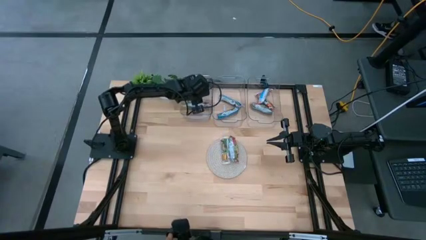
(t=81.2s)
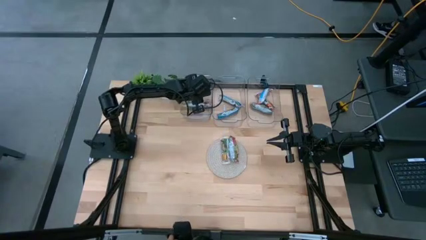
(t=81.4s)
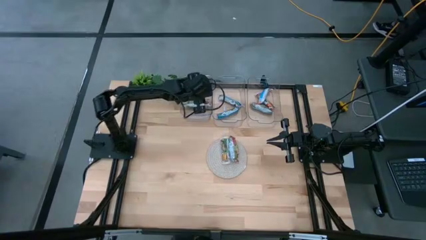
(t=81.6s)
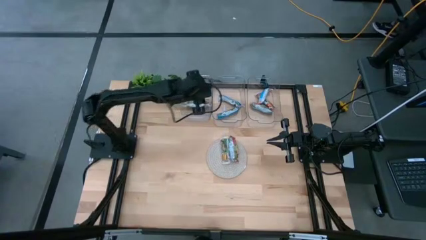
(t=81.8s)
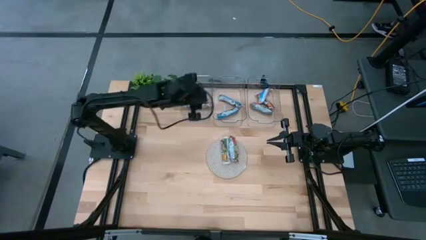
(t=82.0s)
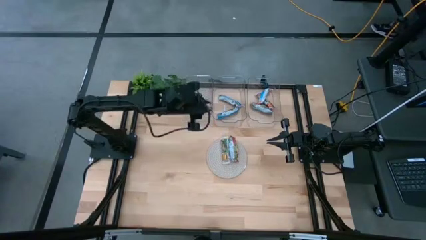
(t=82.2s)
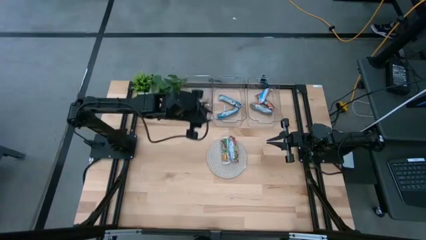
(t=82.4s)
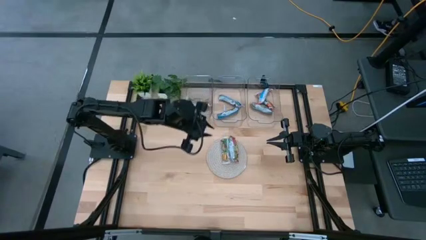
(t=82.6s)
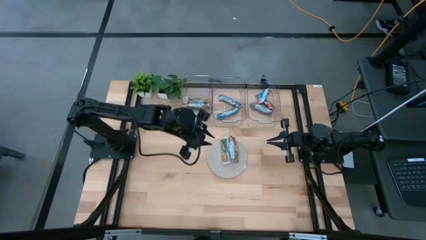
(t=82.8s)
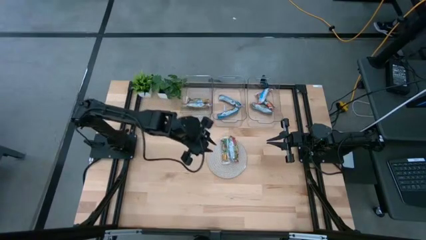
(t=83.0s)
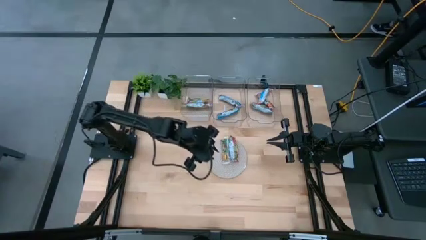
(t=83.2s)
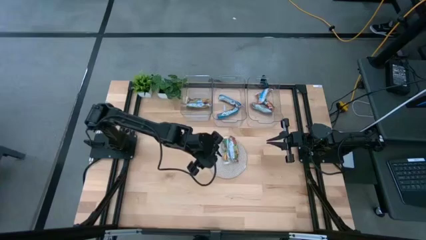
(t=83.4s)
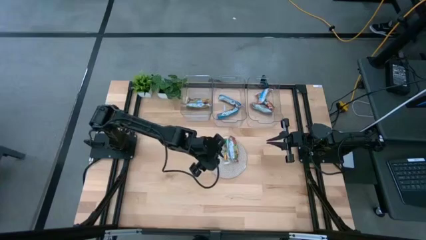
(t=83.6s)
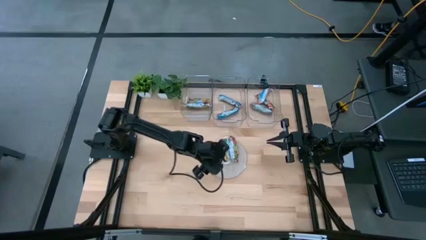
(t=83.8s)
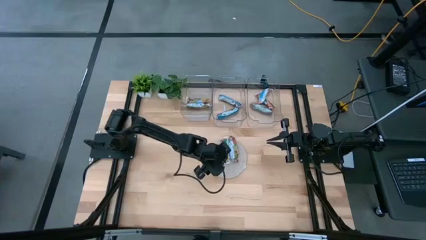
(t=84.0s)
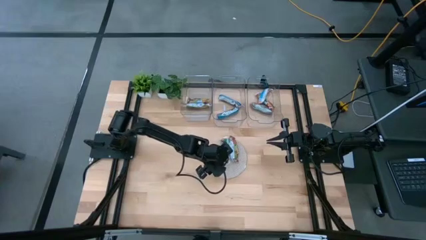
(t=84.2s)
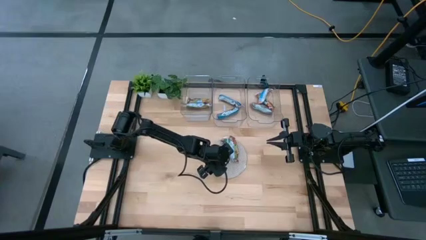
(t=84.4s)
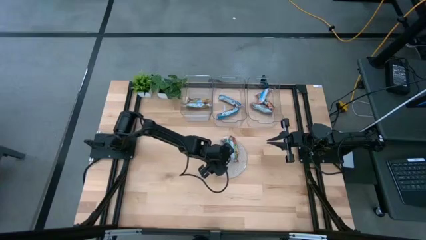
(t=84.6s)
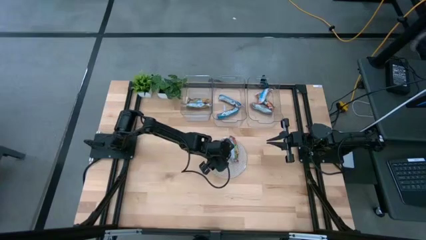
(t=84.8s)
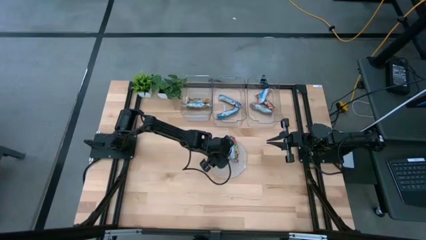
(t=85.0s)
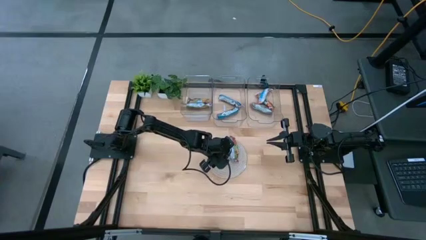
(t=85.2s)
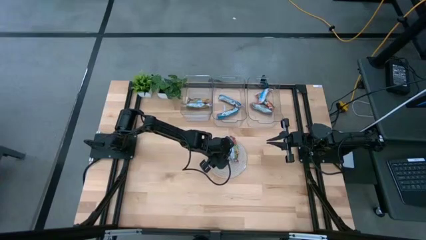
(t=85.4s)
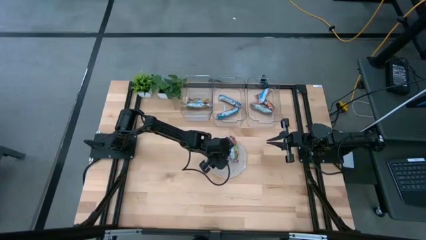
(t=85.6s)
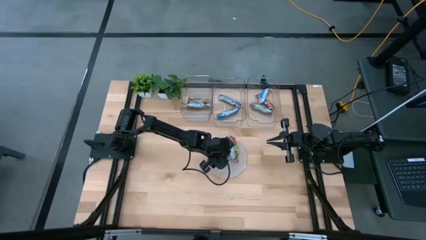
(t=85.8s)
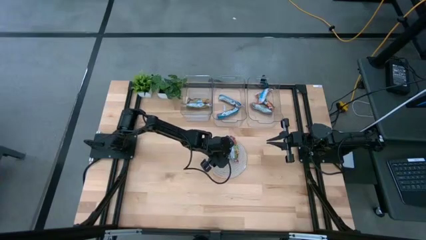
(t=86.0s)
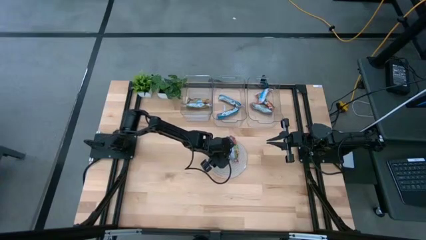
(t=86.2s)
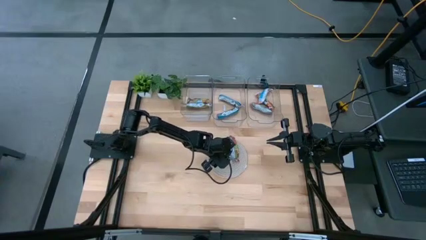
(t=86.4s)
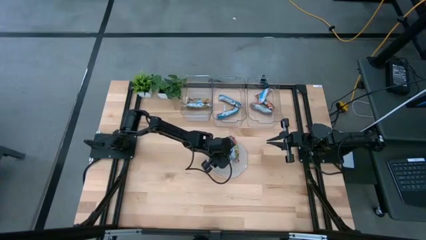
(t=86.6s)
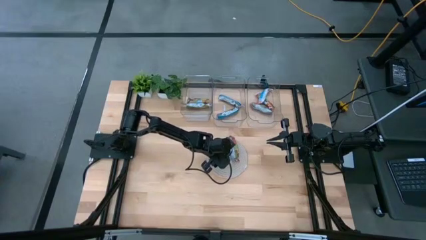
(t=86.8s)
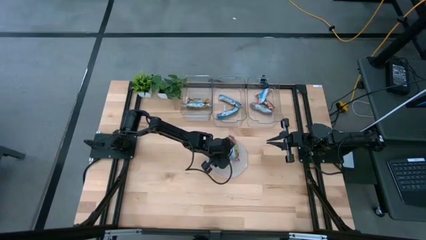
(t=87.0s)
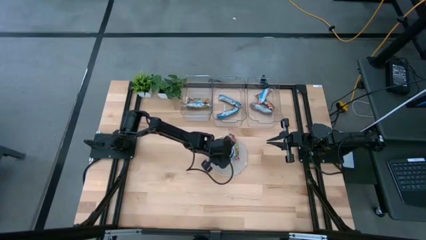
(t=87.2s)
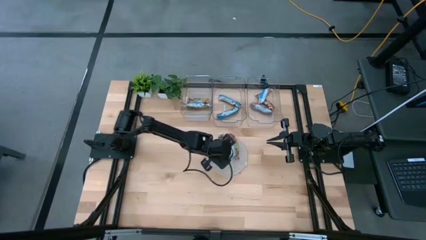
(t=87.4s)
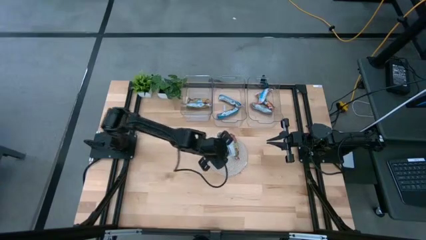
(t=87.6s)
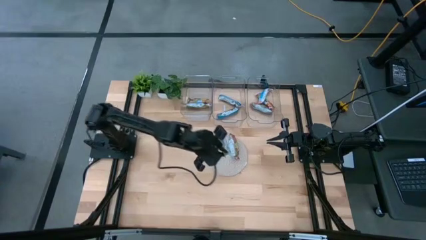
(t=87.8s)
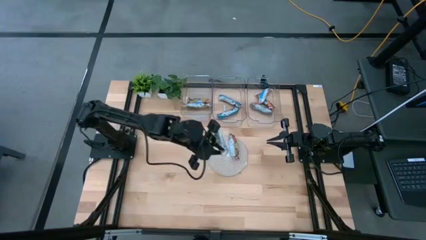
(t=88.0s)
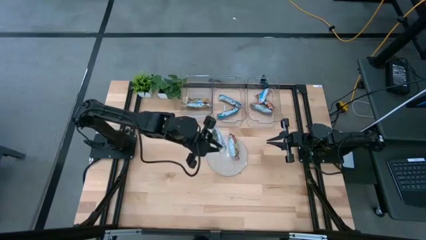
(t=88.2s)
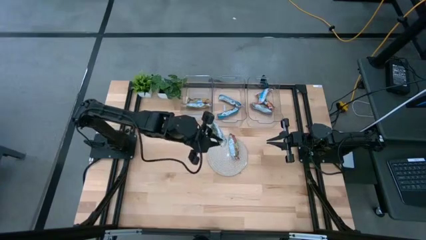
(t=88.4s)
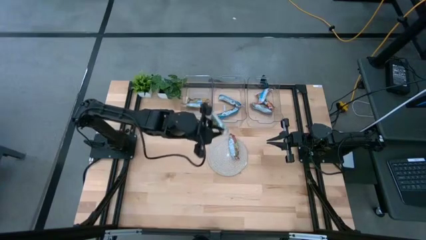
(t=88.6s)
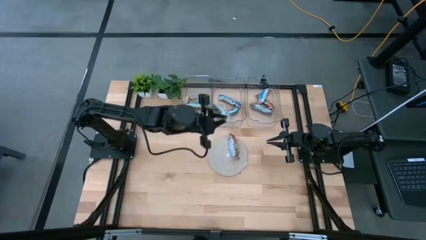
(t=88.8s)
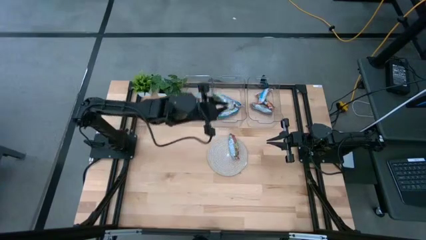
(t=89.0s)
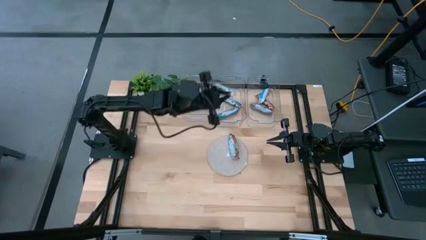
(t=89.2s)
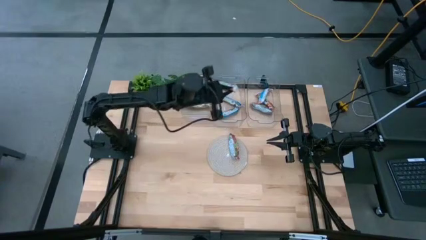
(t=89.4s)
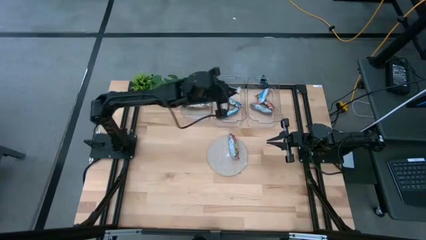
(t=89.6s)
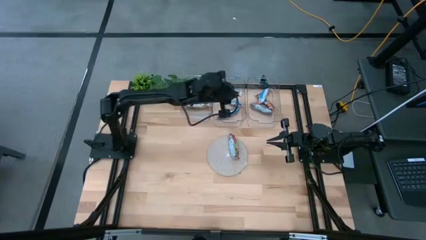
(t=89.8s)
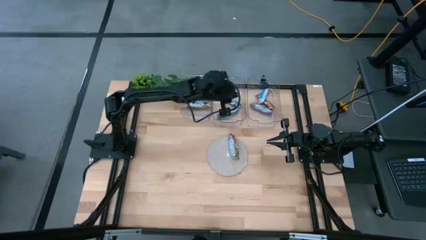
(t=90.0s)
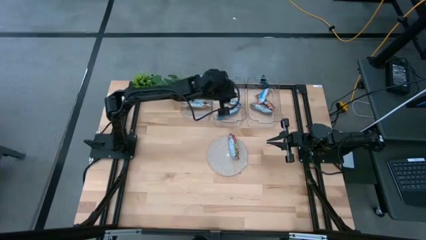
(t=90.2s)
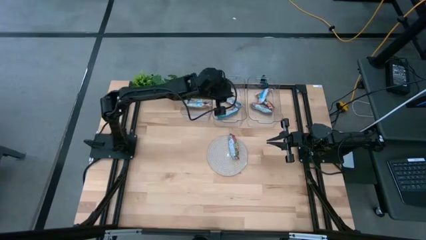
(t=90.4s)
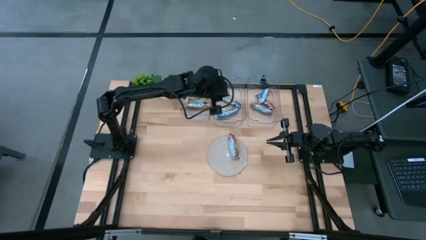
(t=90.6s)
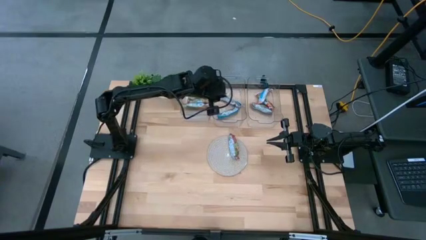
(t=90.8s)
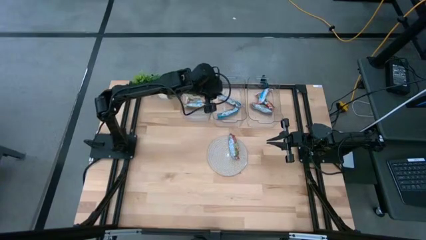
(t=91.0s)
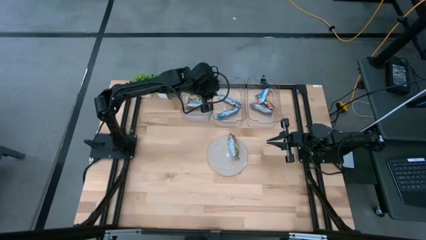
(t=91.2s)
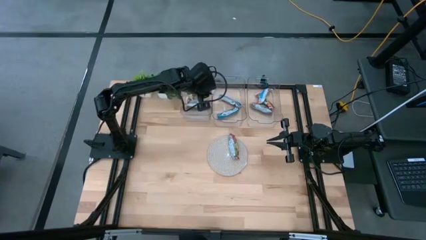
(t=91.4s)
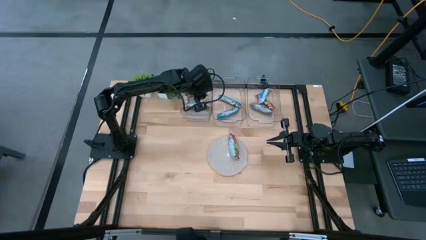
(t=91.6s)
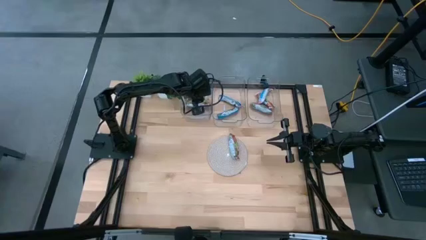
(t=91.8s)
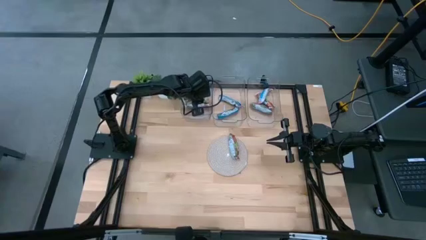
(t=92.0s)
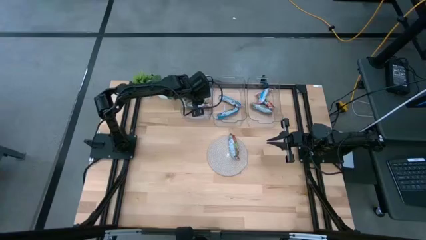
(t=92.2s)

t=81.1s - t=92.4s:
Task: Pick and place Granola Bars by type
Put the yellow granola bar into the left transparent bin
